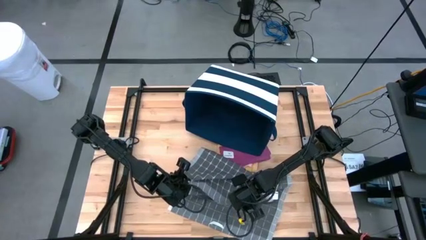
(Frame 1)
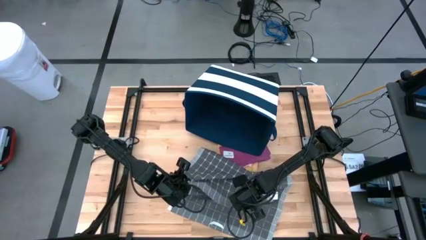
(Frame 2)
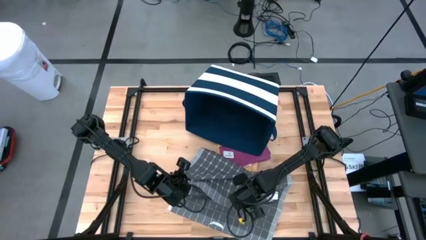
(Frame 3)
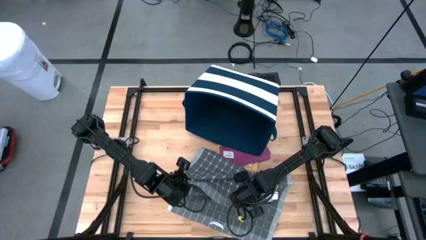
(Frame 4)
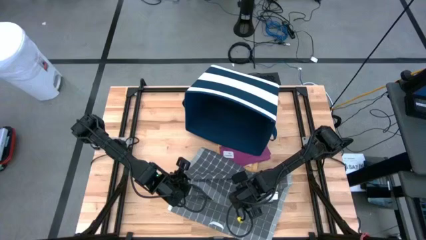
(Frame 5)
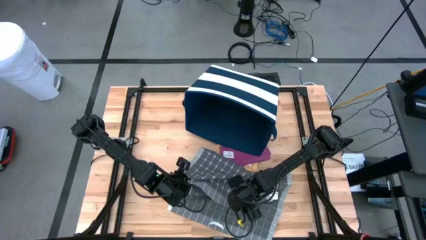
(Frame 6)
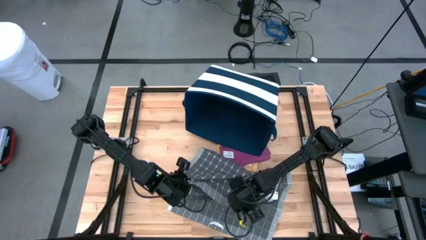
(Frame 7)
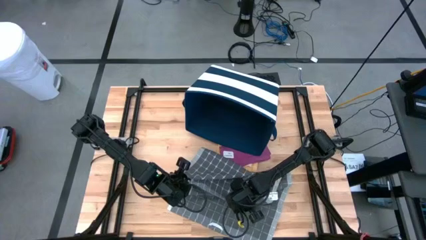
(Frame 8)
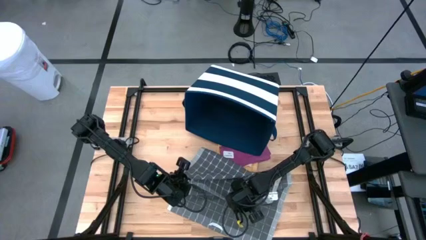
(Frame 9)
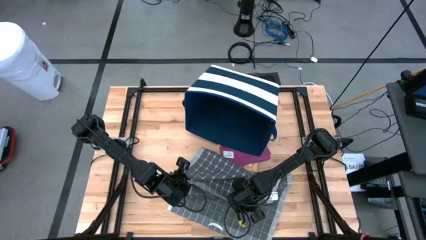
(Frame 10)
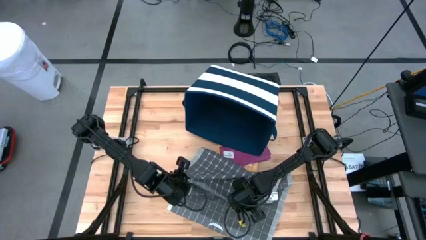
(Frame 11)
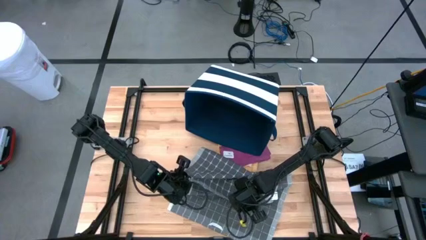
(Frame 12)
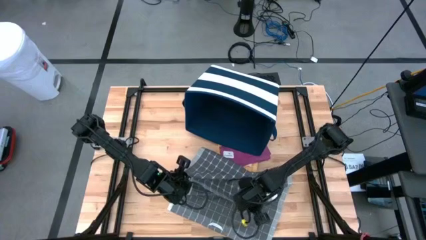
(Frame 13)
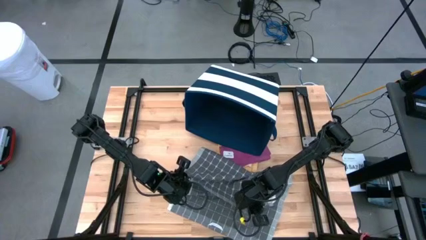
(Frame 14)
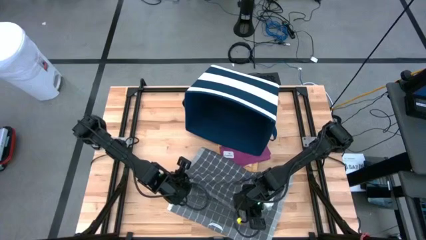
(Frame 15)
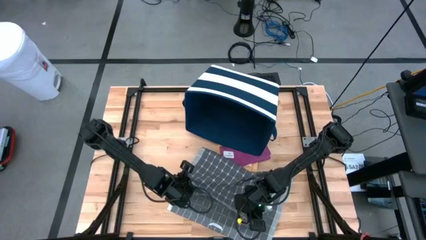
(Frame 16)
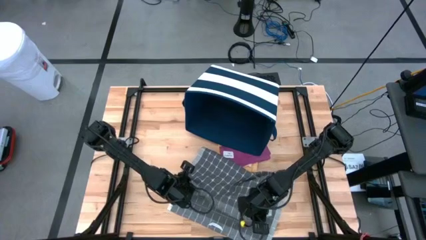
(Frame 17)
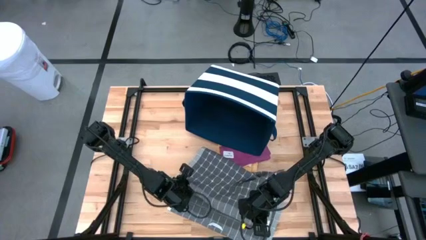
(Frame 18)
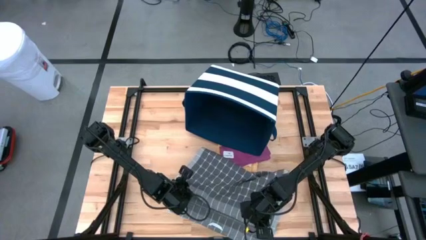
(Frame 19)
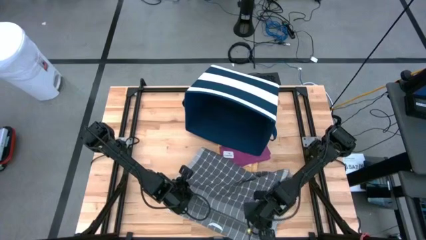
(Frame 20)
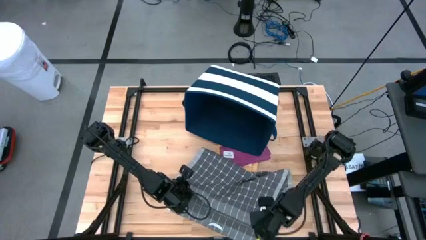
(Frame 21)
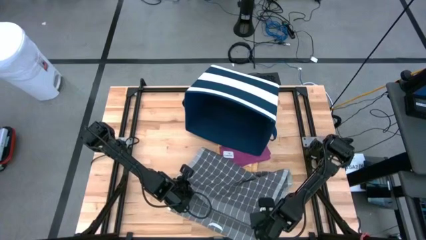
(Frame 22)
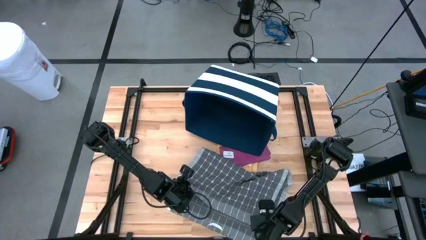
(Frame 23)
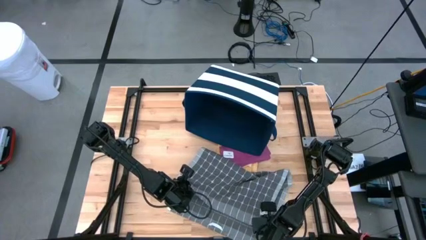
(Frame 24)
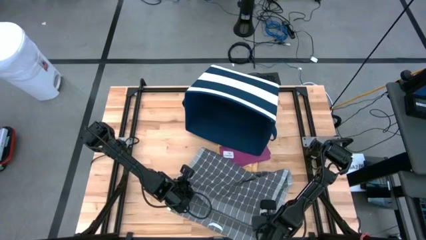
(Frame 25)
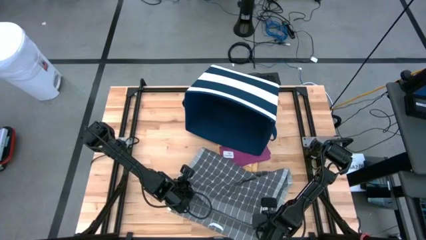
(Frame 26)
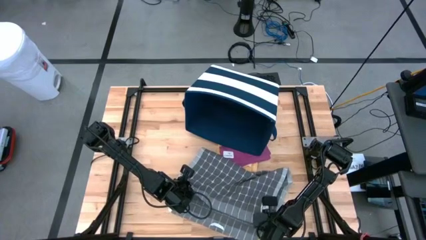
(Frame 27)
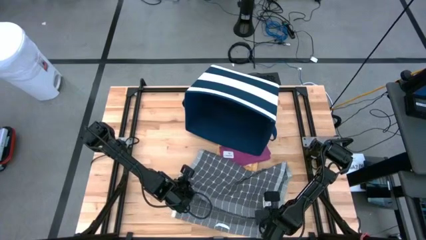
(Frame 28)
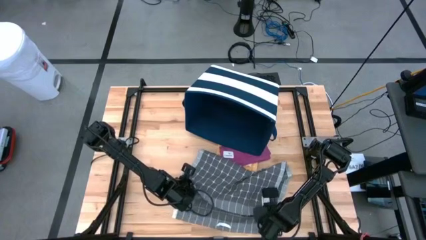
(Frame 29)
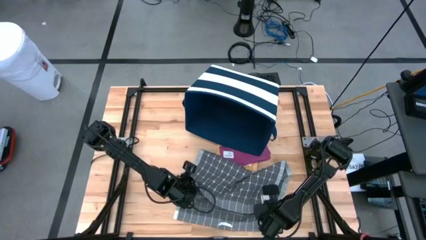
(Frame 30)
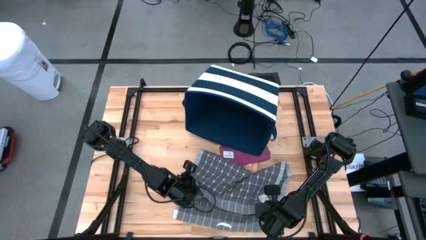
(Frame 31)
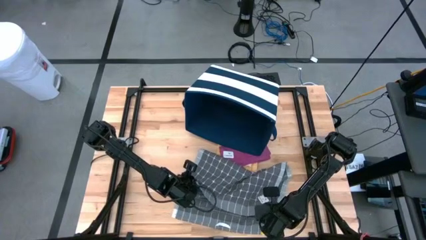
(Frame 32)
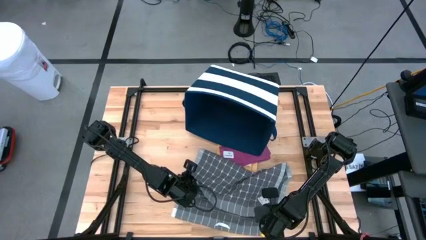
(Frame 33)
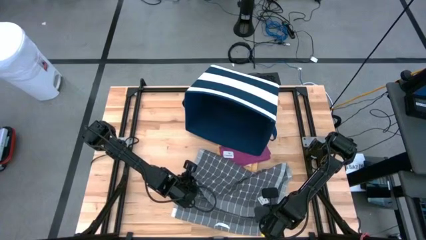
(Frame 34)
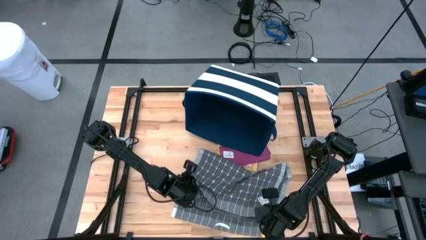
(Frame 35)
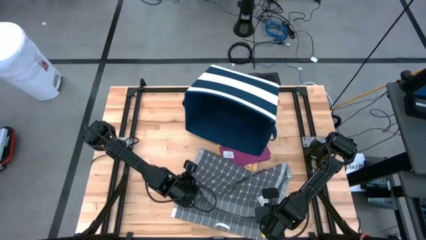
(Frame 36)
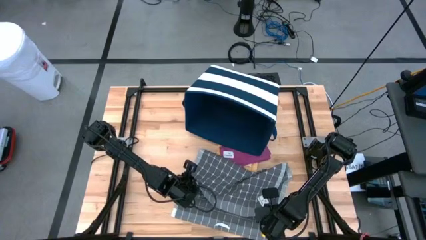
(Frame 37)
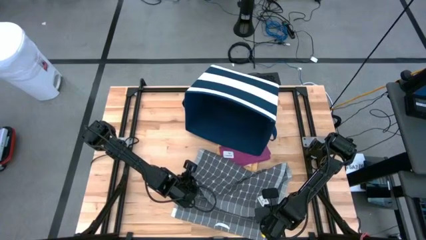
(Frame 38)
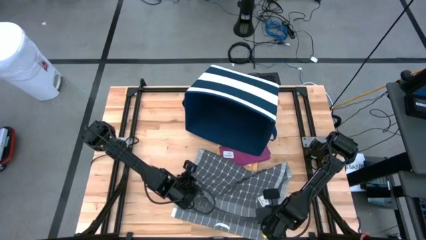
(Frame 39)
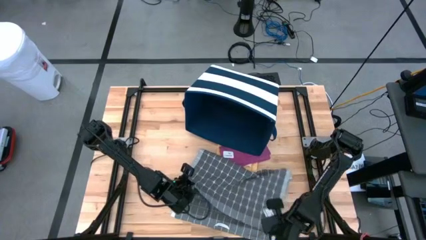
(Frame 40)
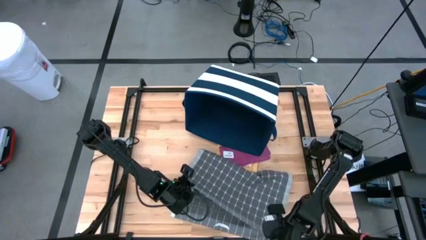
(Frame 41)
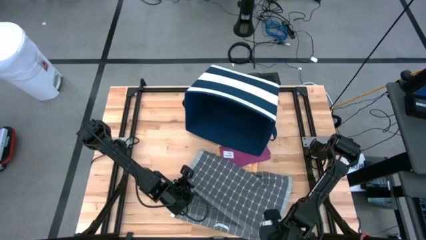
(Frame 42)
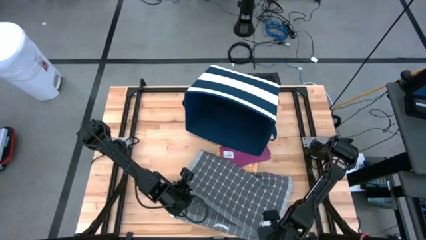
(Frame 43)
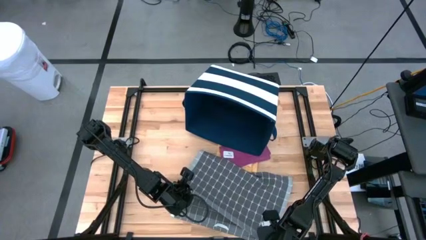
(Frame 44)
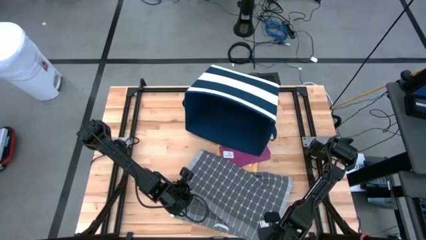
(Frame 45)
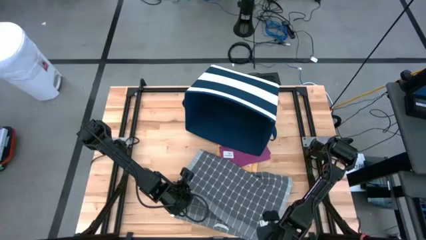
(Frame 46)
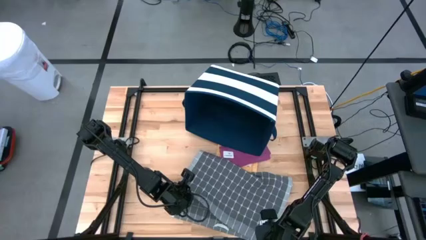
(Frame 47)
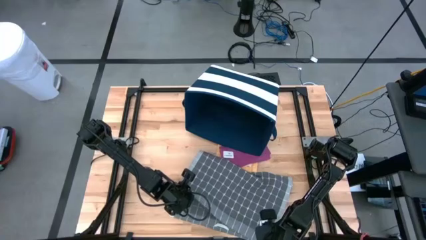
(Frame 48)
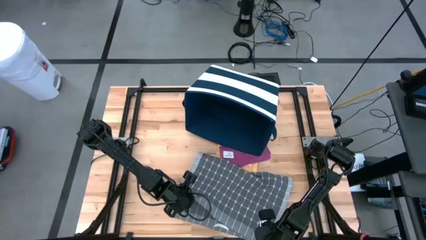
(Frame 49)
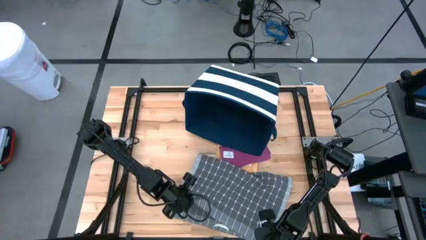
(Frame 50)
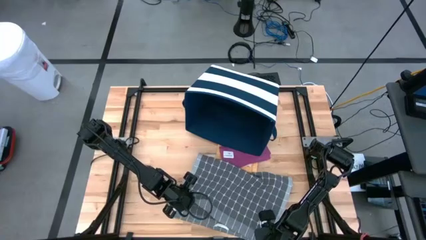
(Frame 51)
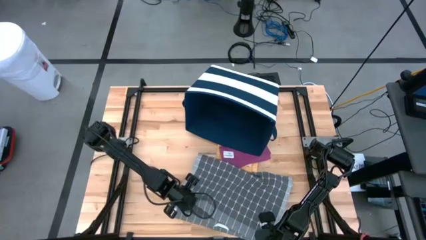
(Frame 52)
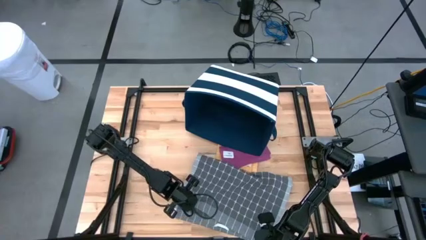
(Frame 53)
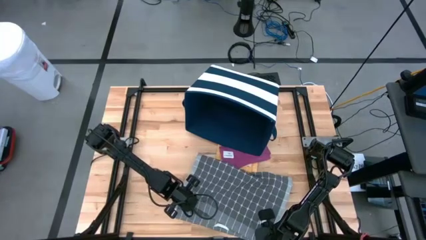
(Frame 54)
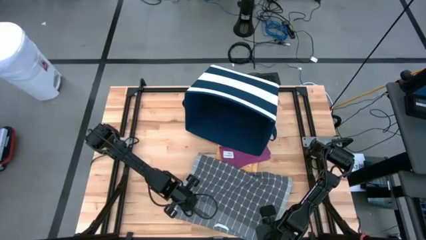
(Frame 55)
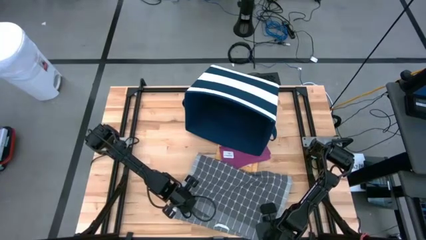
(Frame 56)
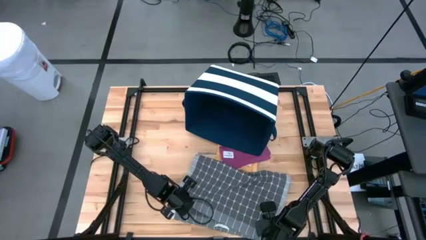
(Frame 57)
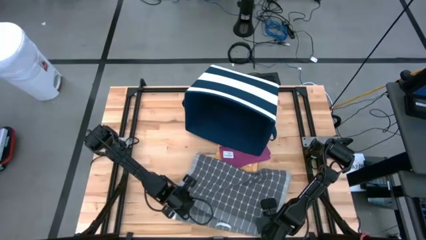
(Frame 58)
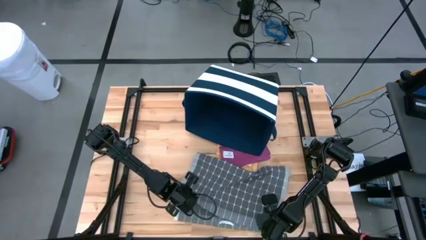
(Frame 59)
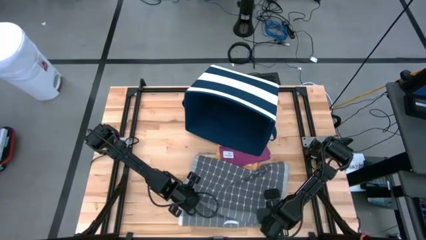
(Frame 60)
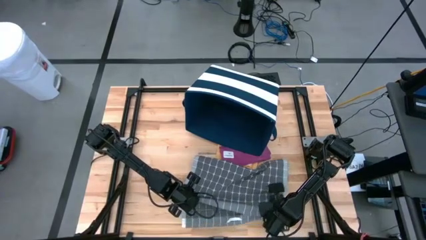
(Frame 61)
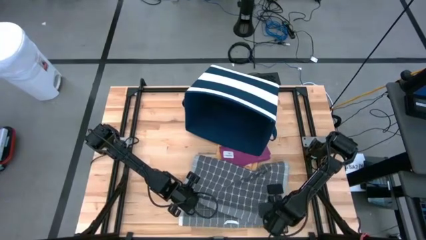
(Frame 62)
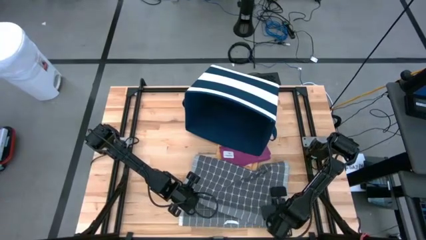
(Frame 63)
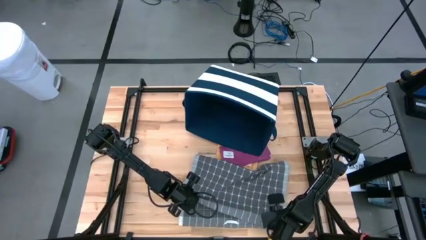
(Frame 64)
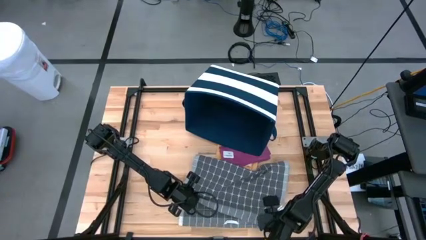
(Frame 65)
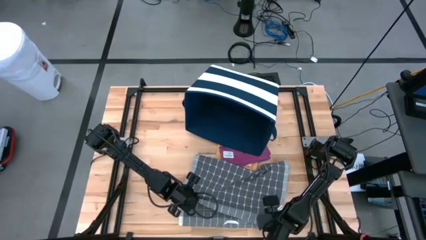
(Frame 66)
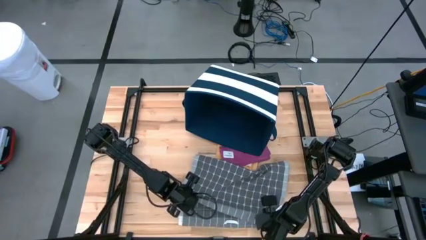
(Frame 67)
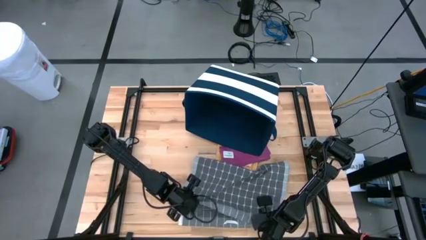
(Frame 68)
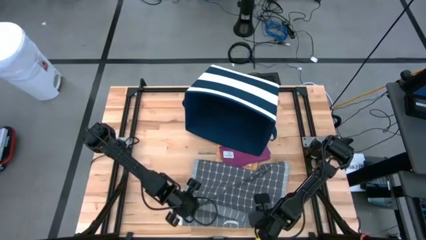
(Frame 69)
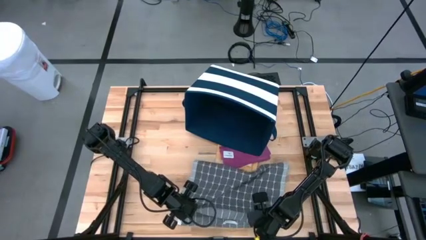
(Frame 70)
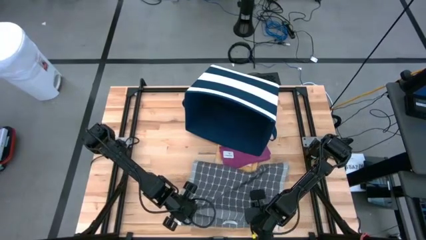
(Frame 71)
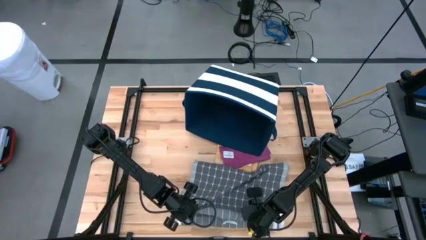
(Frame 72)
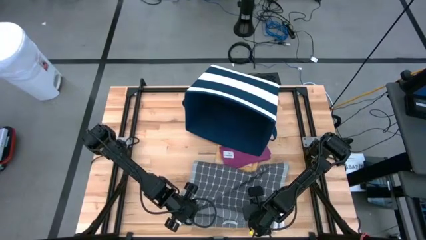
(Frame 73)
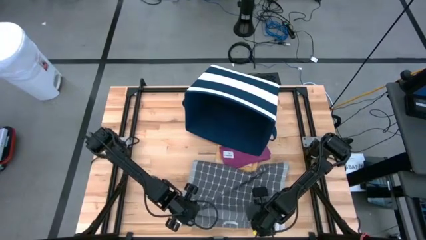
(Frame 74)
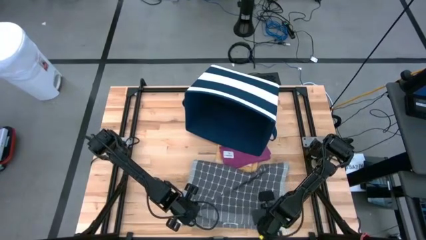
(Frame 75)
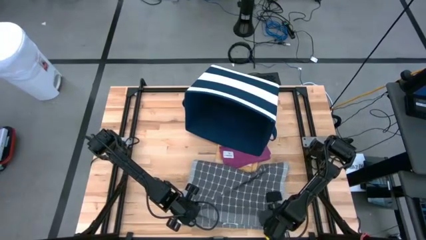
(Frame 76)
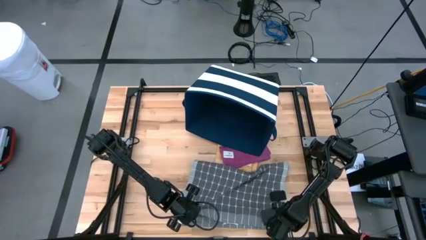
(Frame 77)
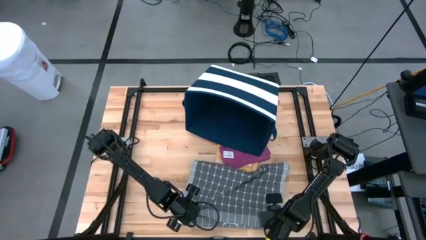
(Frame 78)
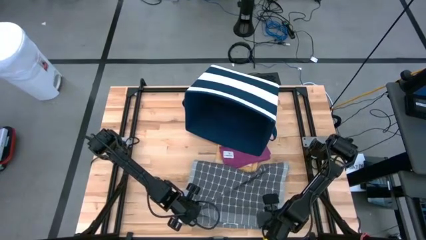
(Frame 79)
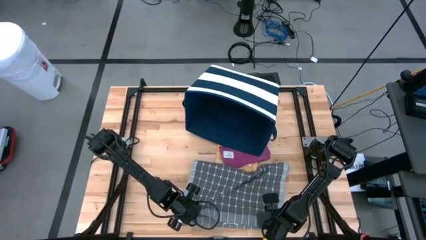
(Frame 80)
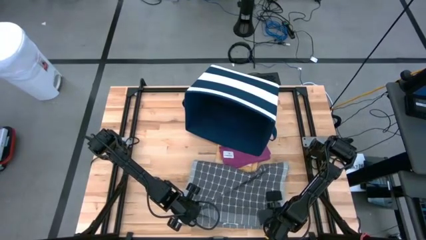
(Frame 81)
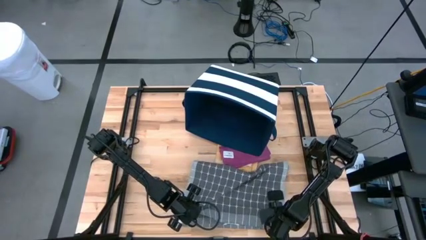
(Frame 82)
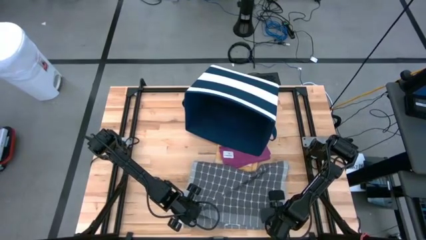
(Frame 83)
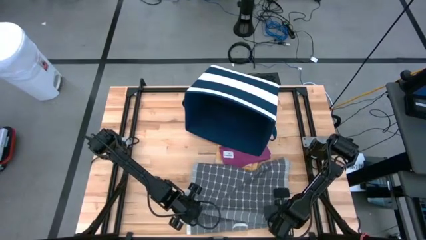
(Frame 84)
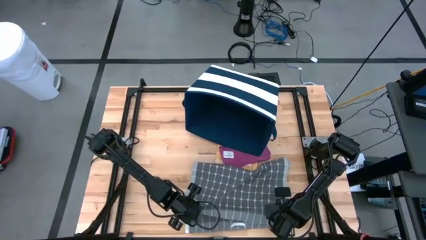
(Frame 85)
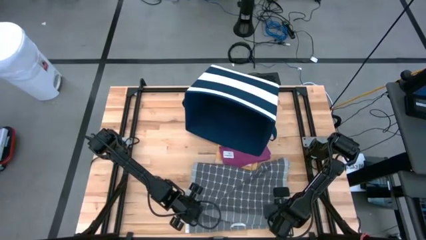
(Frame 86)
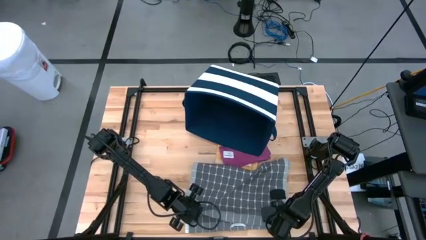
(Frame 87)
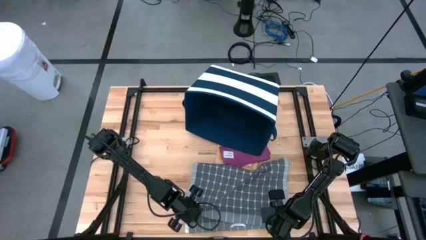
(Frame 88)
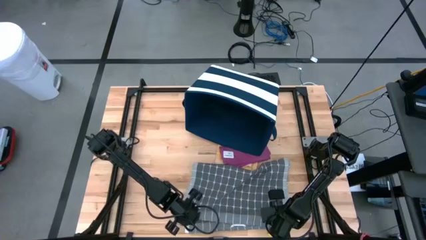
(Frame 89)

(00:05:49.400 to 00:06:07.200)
Task: Fold towel
Fold the gray towel
